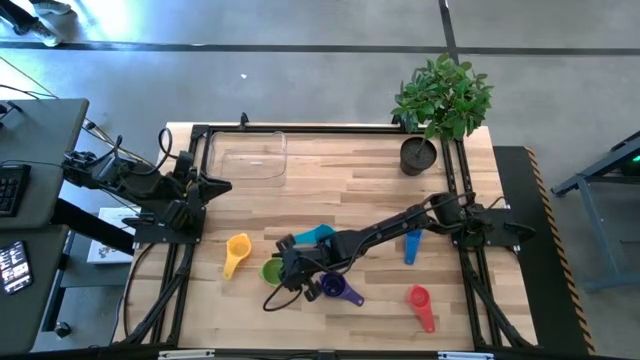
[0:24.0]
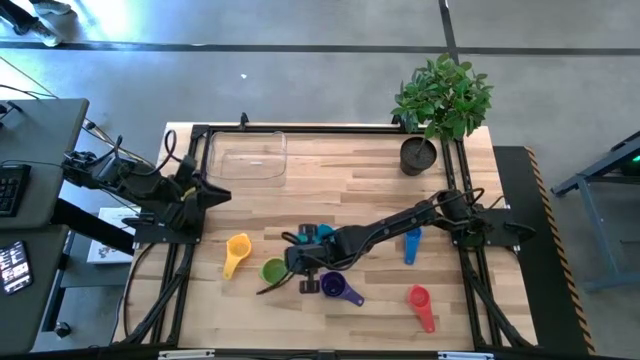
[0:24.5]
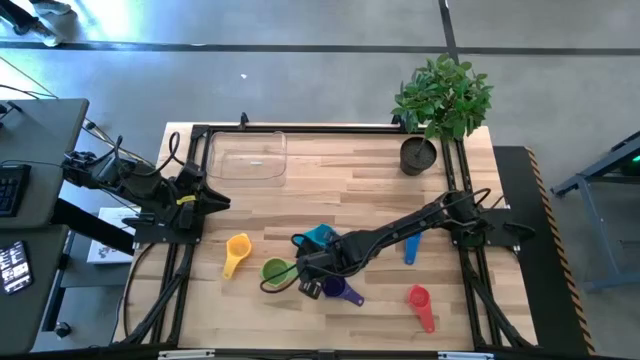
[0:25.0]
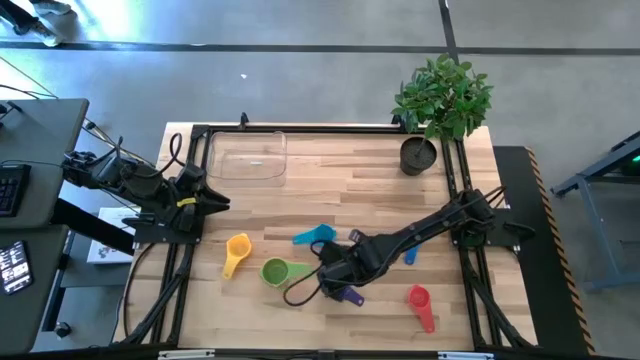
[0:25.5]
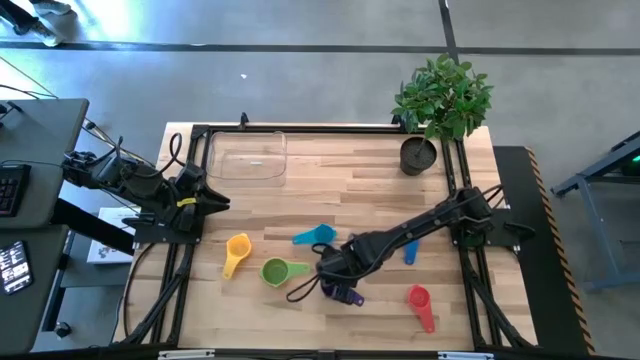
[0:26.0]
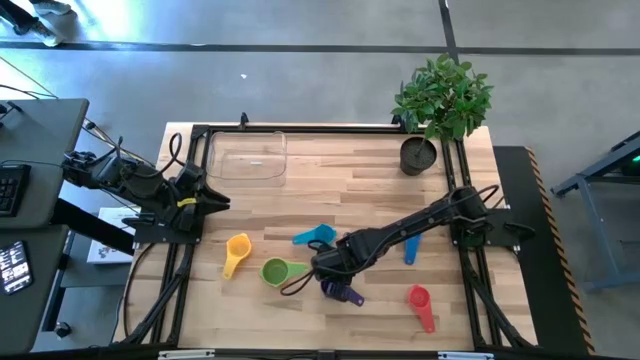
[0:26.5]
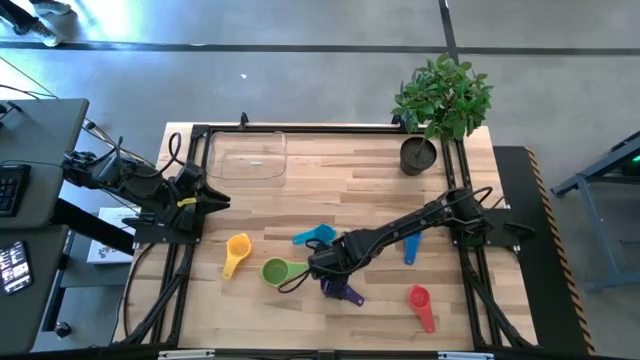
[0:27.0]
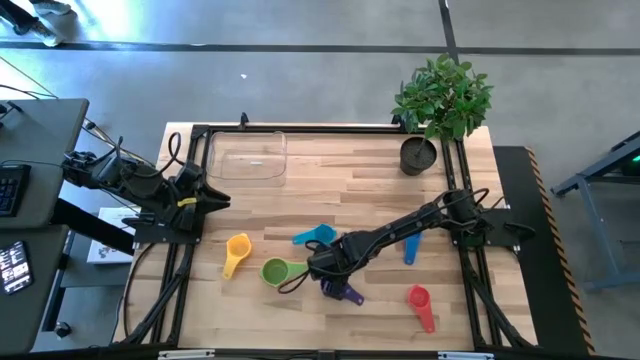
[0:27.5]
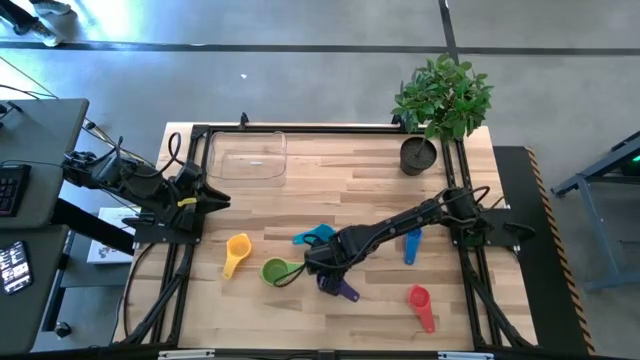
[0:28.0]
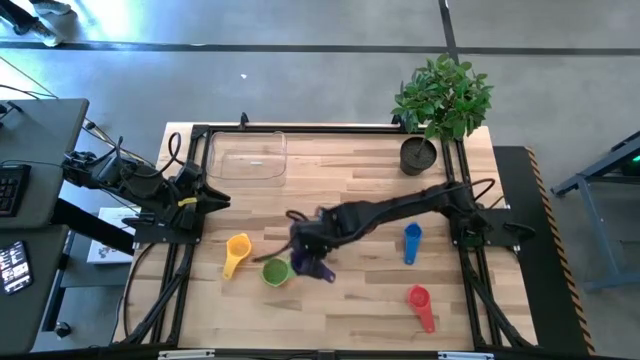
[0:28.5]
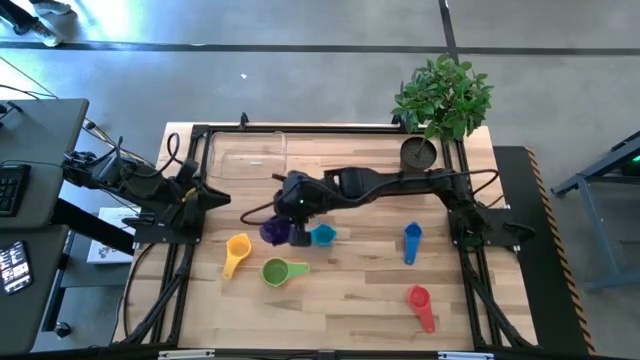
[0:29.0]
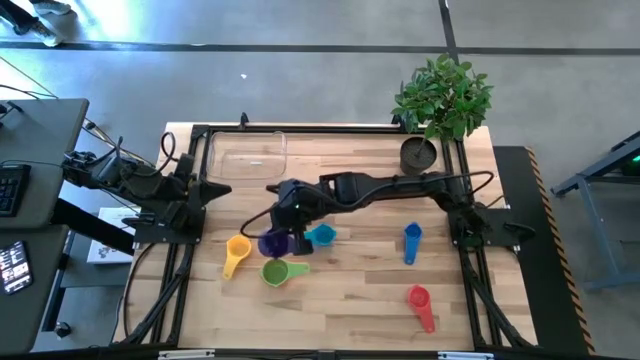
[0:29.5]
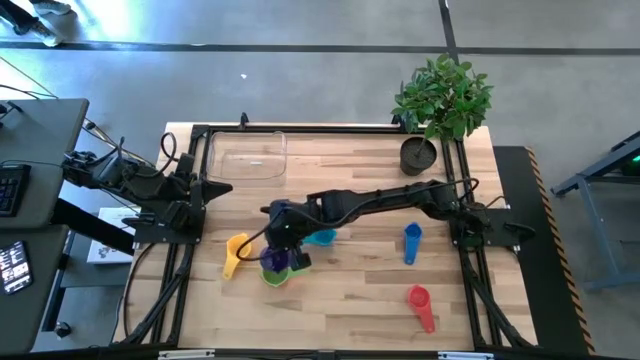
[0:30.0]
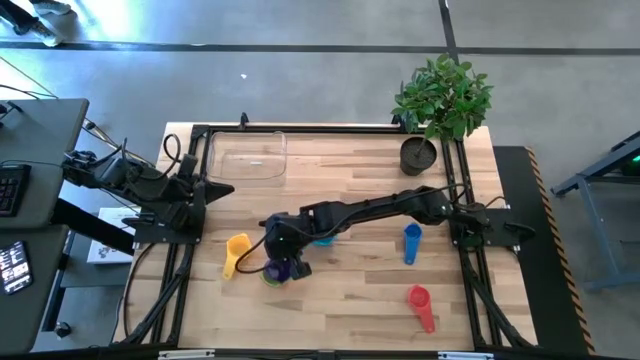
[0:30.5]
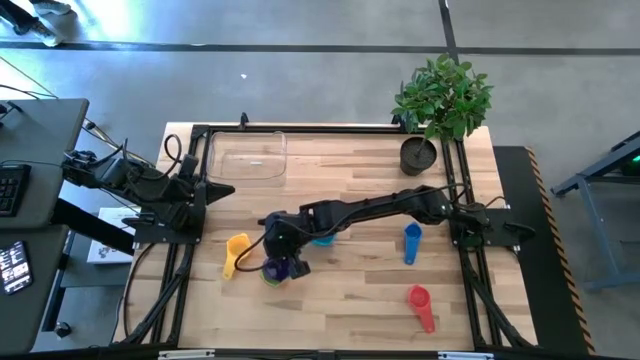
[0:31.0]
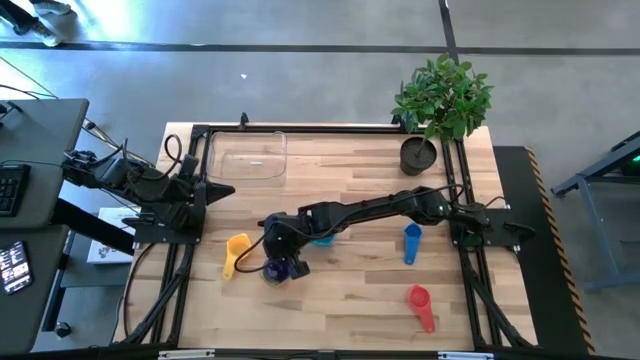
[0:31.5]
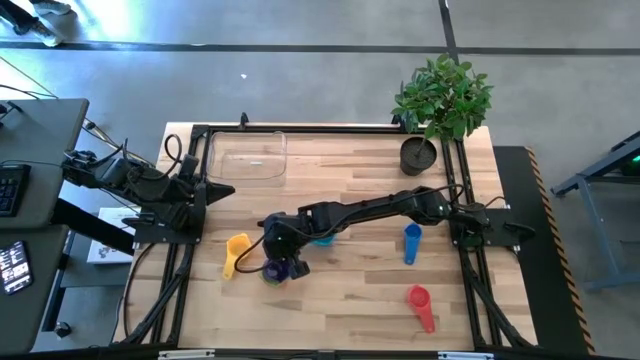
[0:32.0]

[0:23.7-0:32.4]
Task: Nest measuring cups in basket
Stack the dark blue measuring cup on top of the green measuring cup

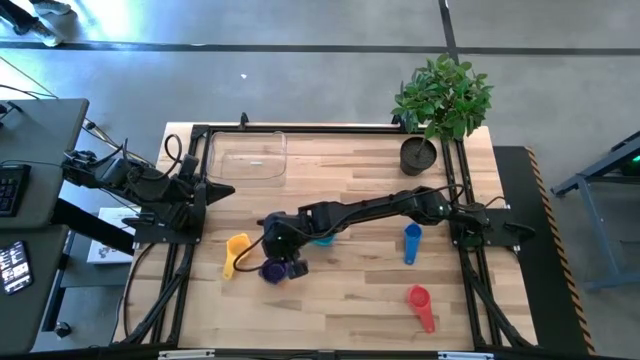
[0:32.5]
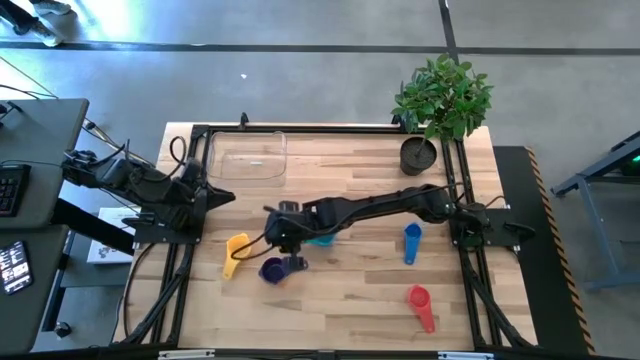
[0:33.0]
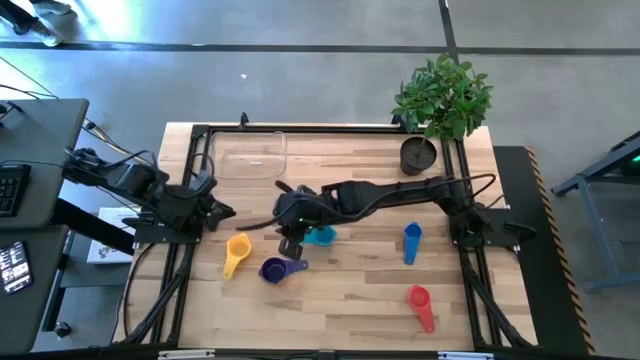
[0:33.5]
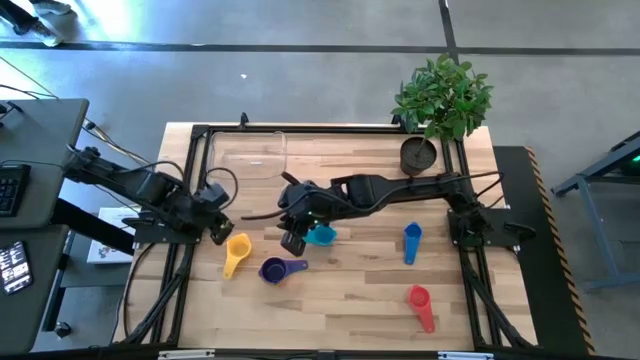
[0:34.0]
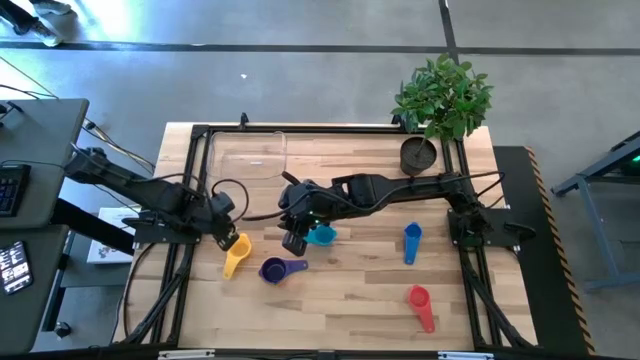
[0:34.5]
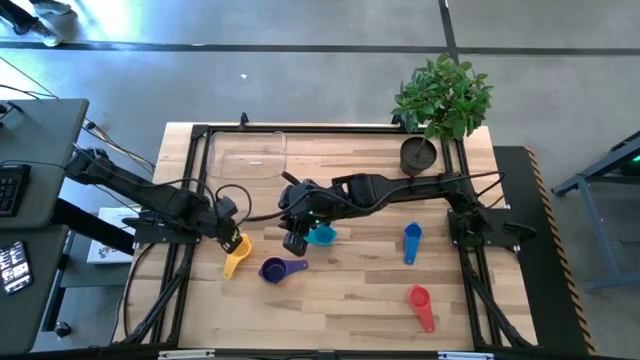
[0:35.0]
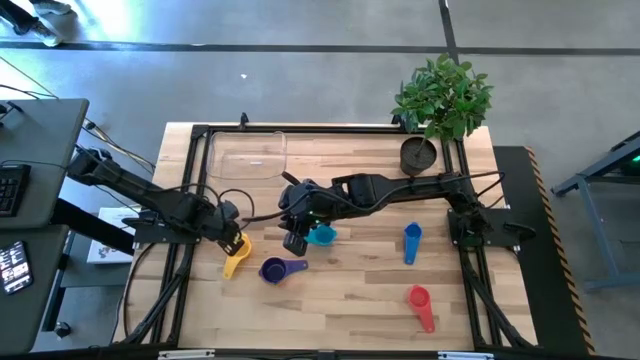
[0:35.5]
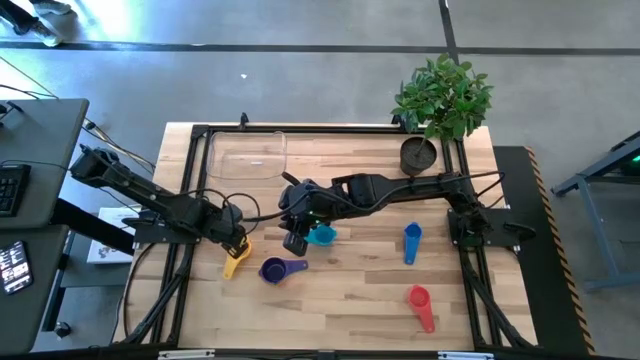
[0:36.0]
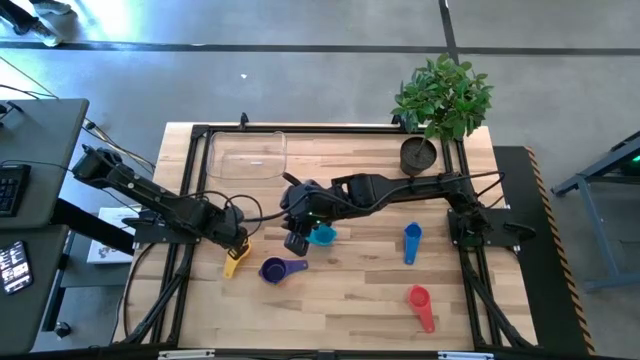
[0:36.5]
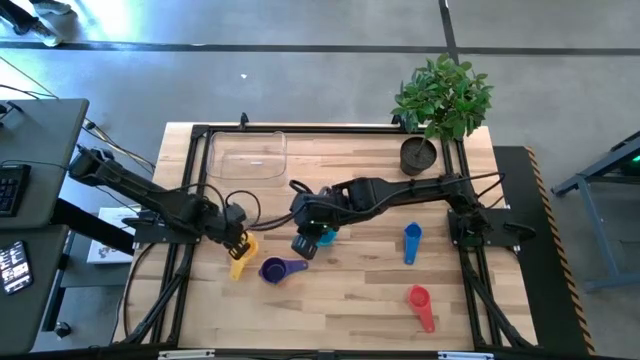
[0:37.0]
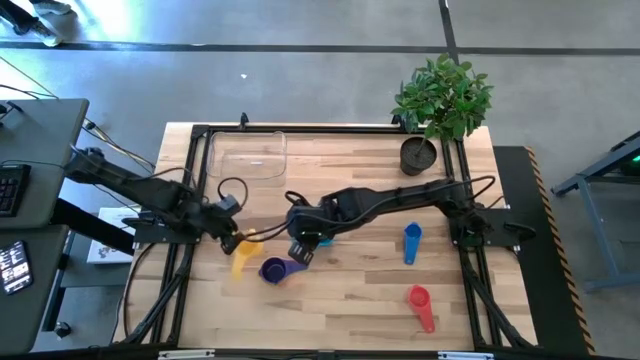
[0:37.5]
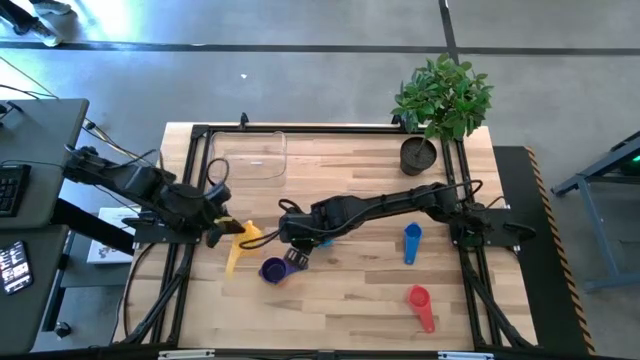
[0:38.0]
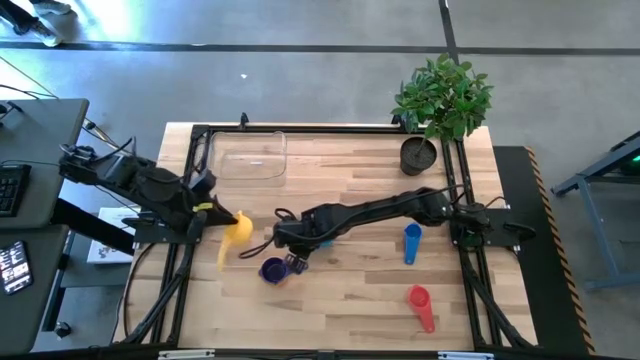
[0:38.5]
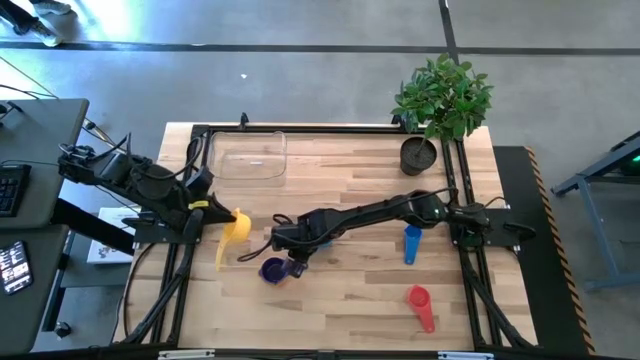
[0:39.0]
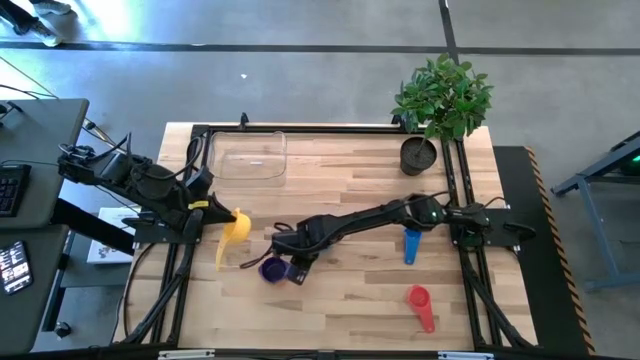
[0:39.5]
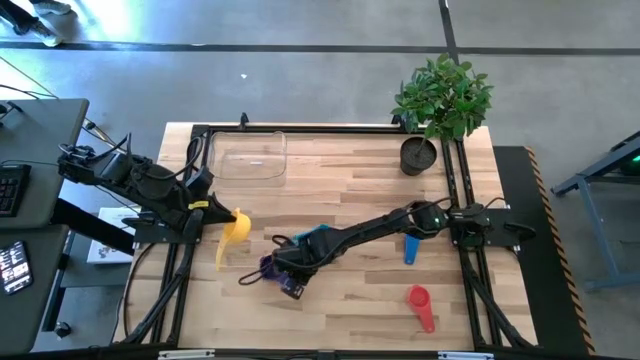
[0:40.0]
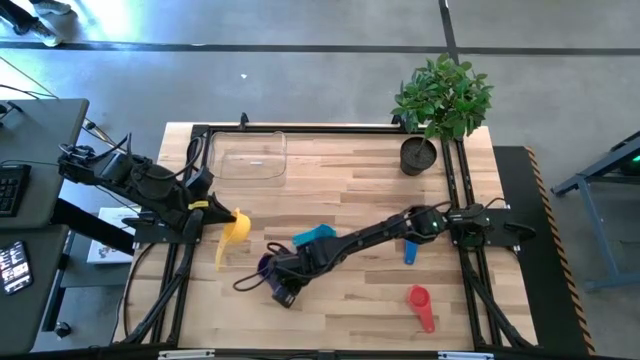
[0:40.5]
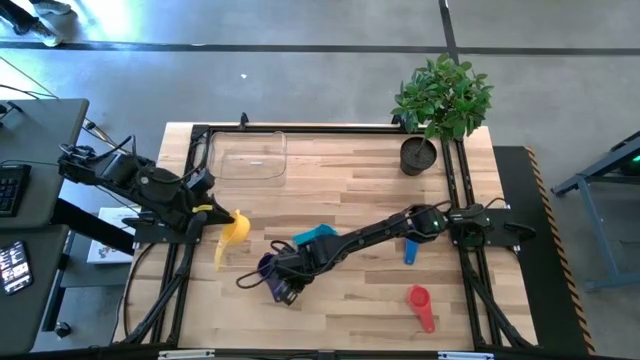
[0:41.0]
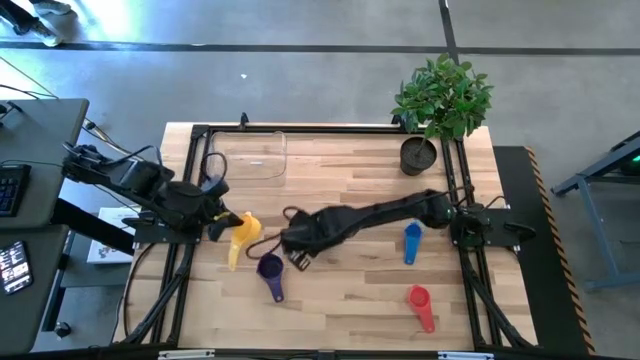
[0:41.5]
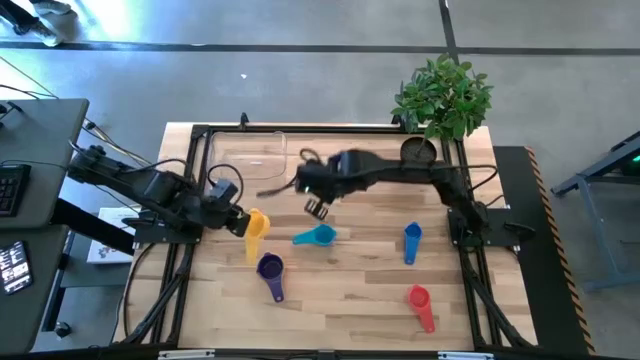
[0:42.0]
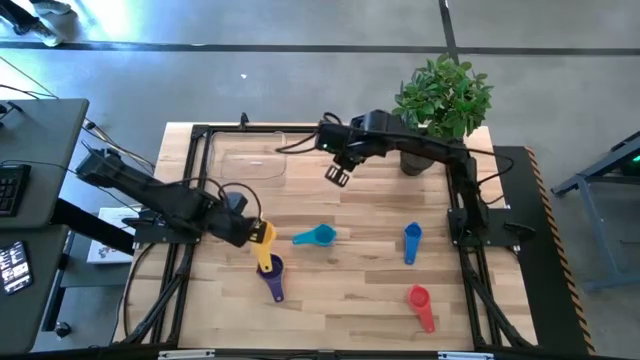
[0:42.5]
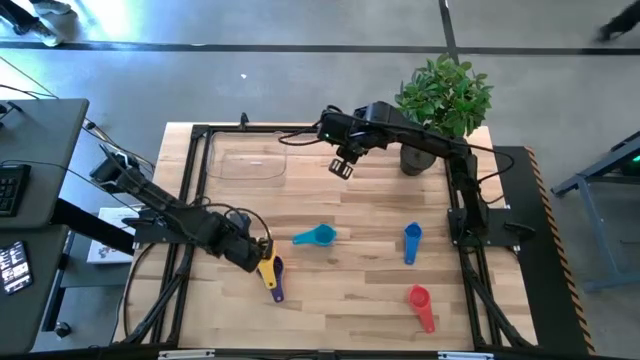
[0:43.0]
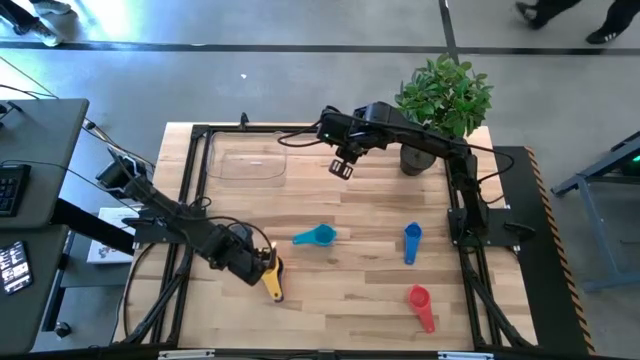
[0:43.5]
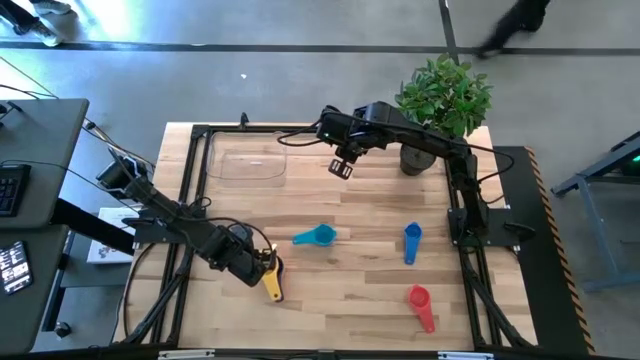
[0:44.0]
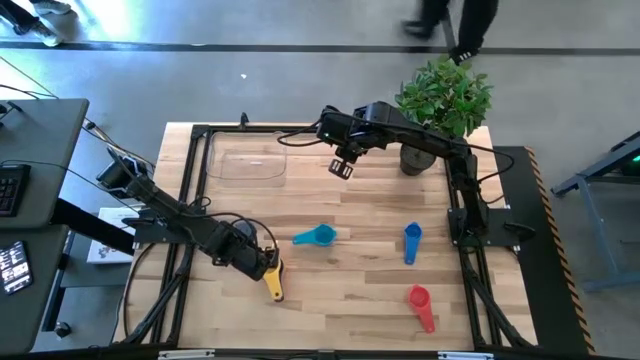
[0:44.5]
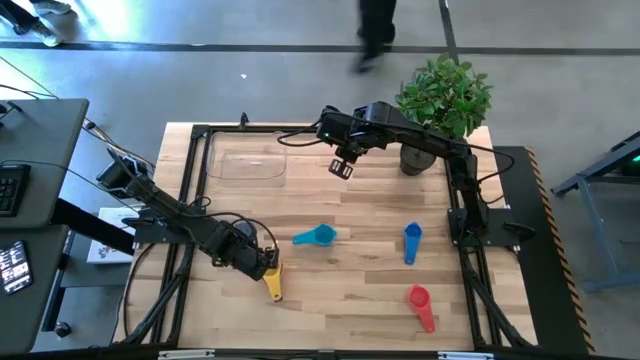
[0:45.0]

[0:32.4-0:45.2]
Stack the yellow measuring cup on top of the dark blue measuring cup
